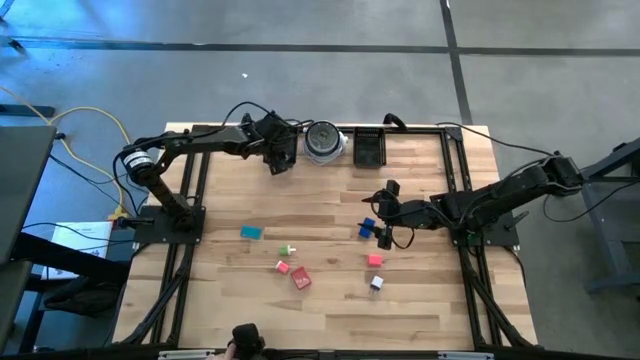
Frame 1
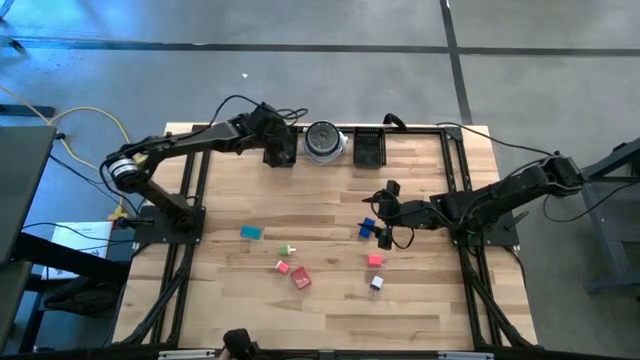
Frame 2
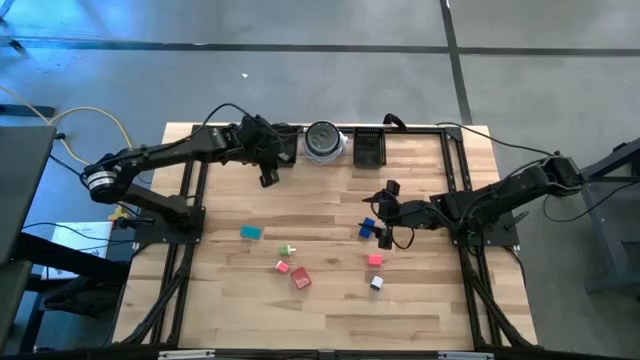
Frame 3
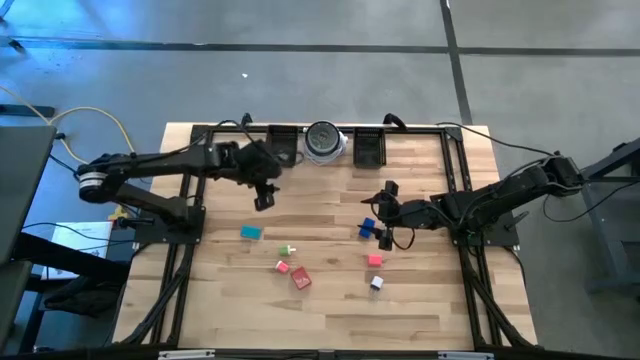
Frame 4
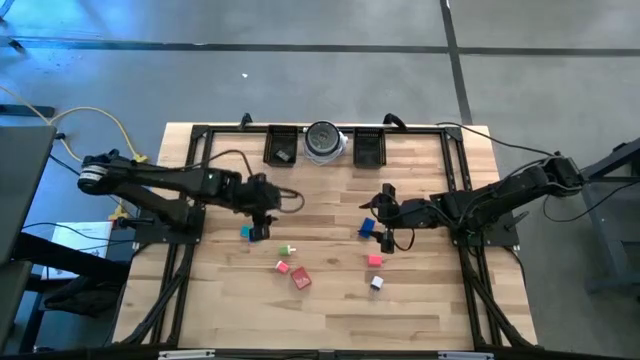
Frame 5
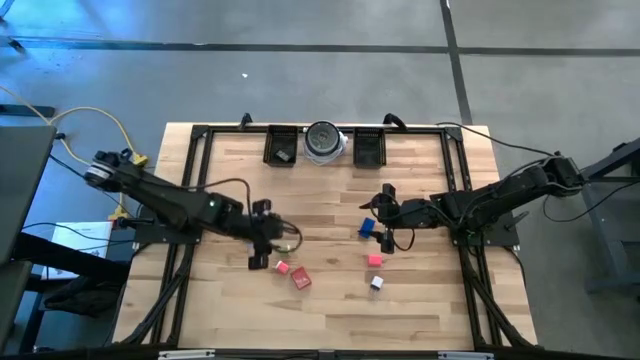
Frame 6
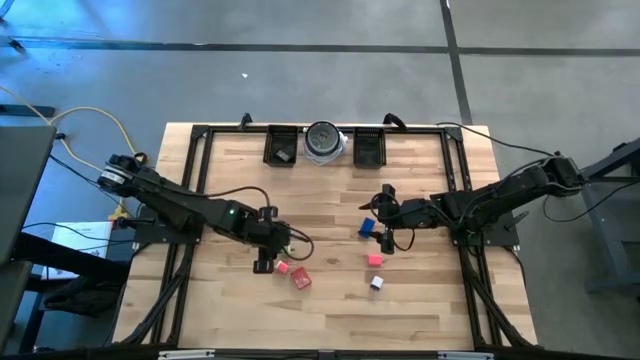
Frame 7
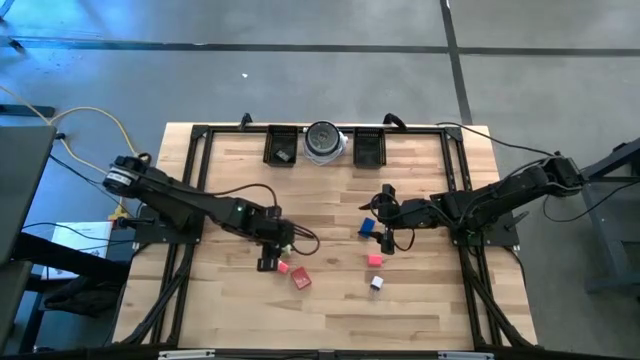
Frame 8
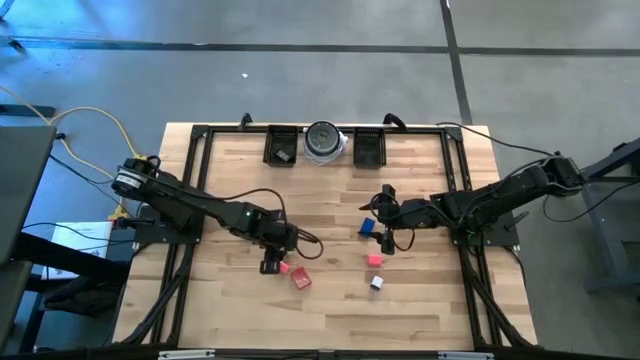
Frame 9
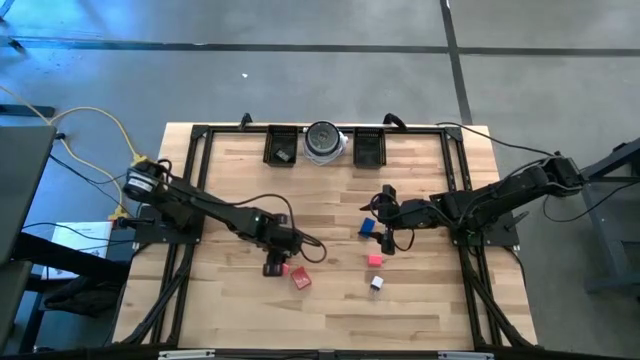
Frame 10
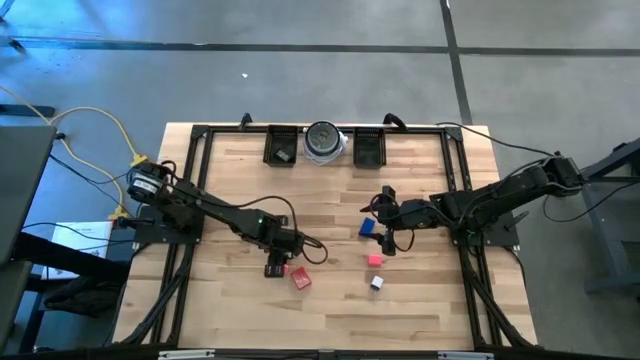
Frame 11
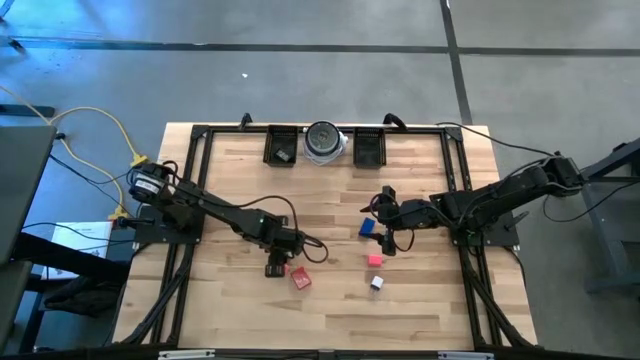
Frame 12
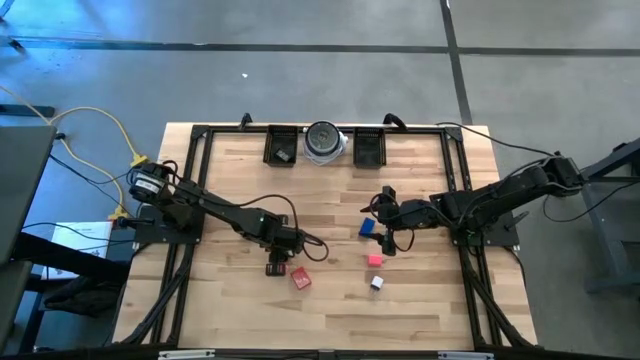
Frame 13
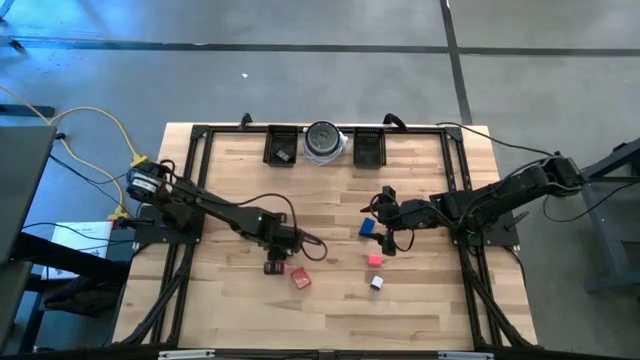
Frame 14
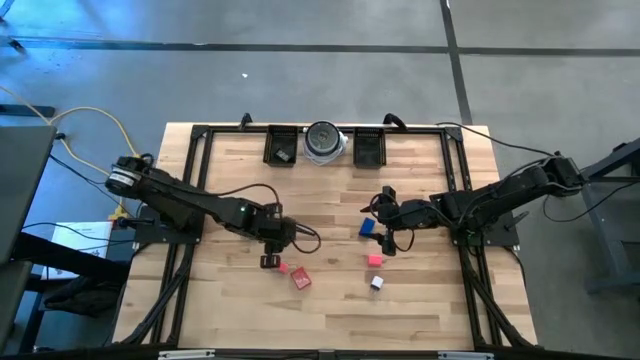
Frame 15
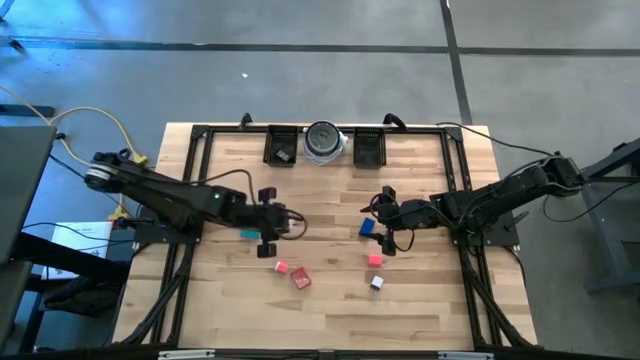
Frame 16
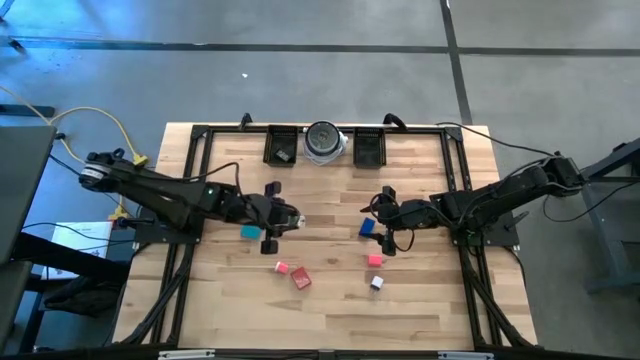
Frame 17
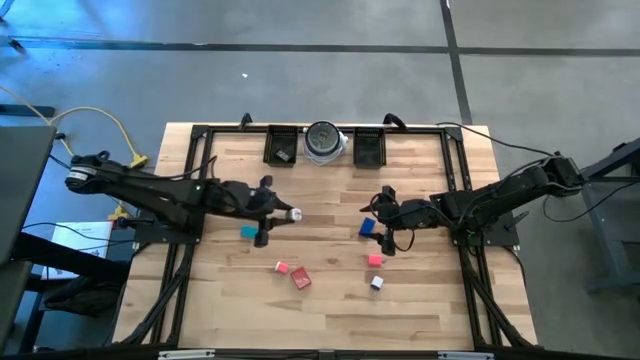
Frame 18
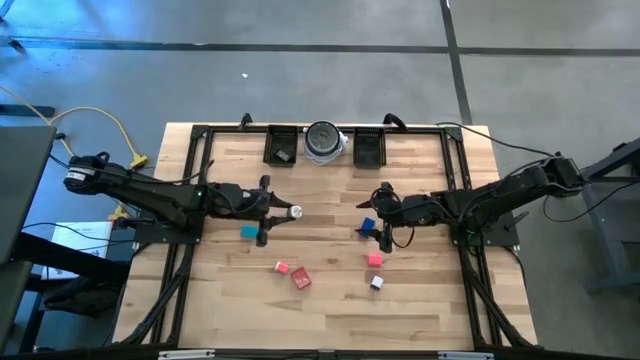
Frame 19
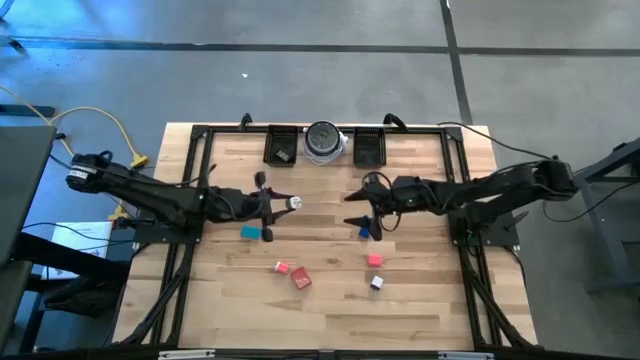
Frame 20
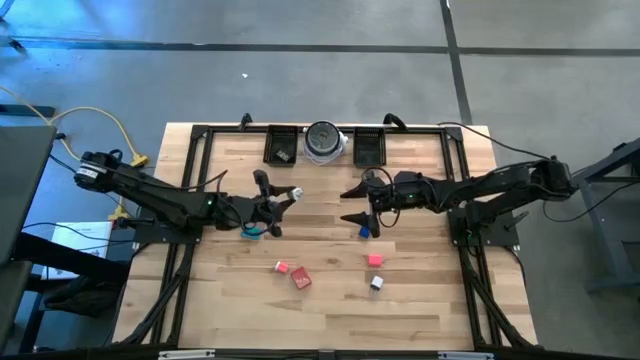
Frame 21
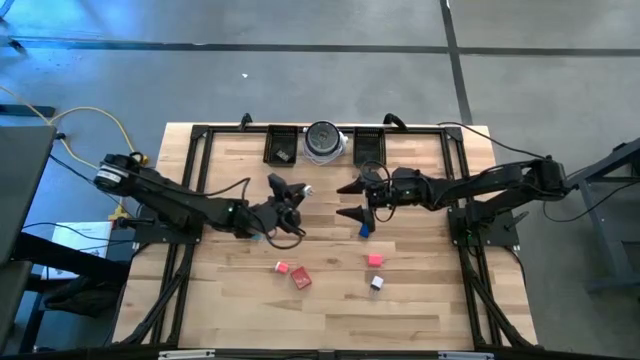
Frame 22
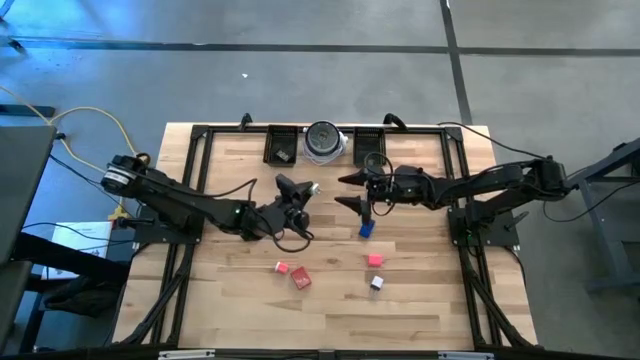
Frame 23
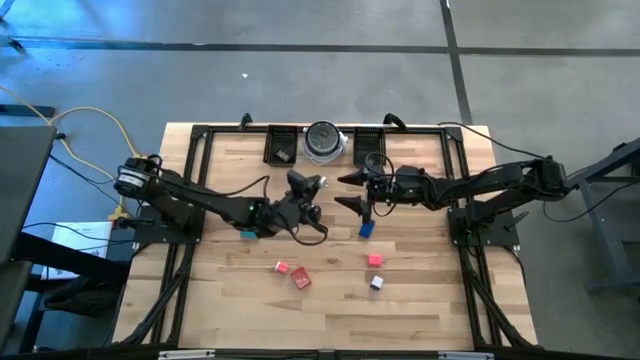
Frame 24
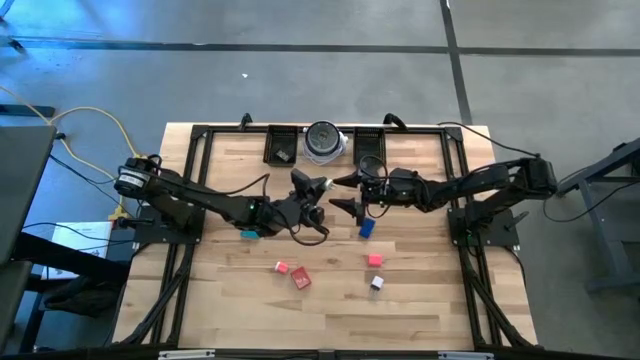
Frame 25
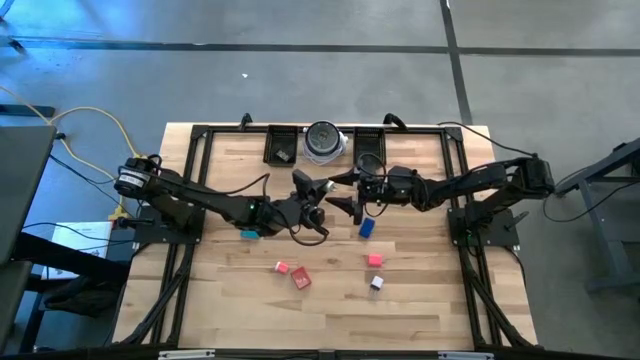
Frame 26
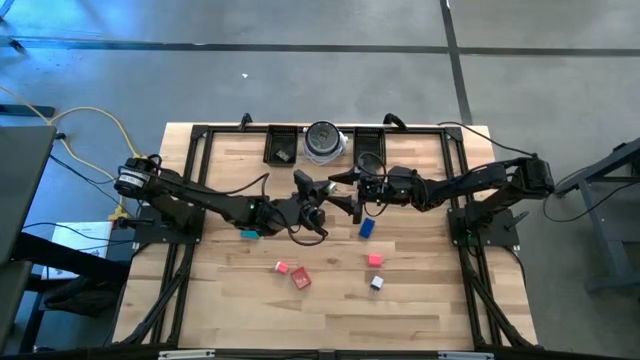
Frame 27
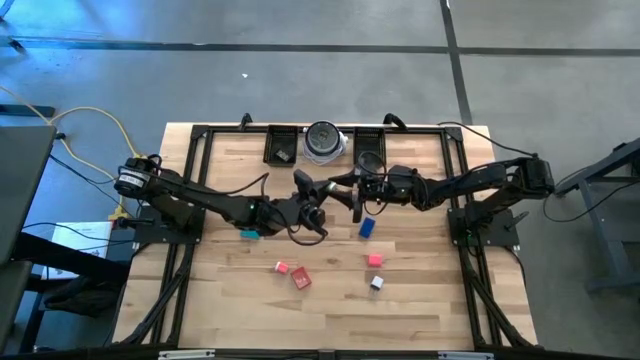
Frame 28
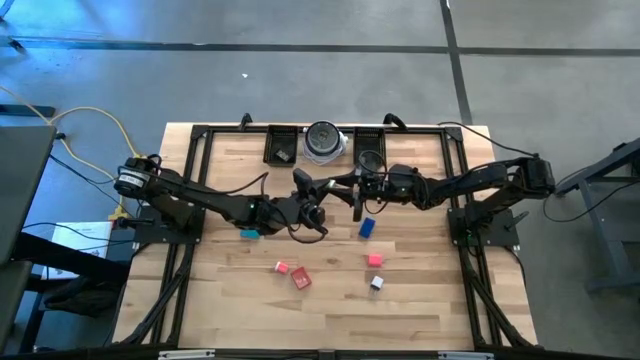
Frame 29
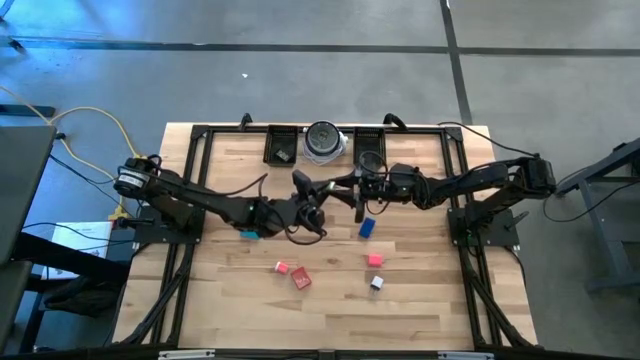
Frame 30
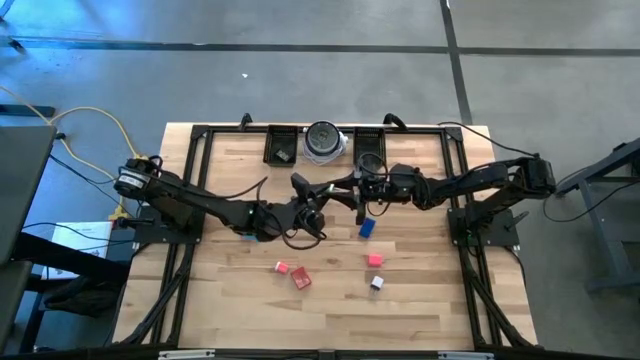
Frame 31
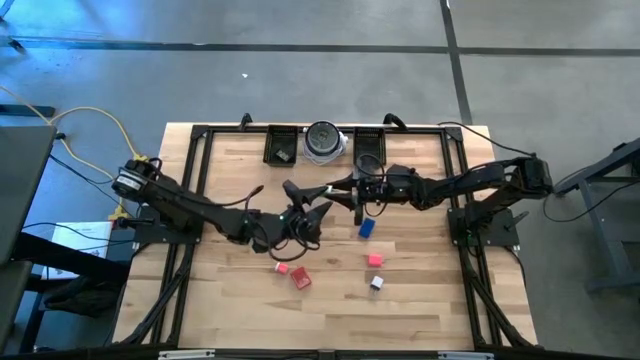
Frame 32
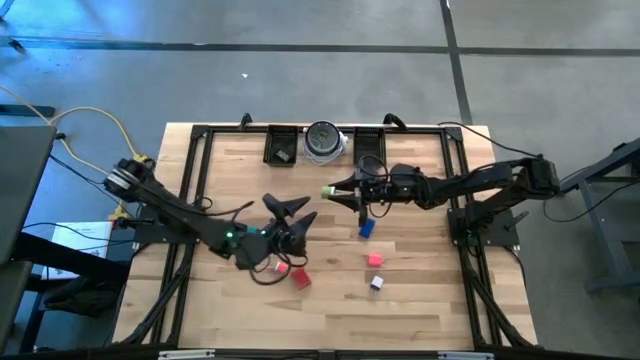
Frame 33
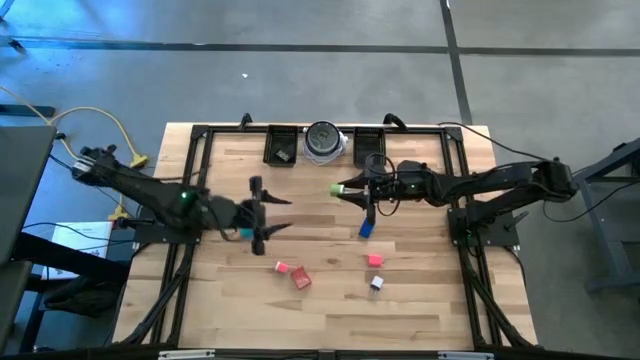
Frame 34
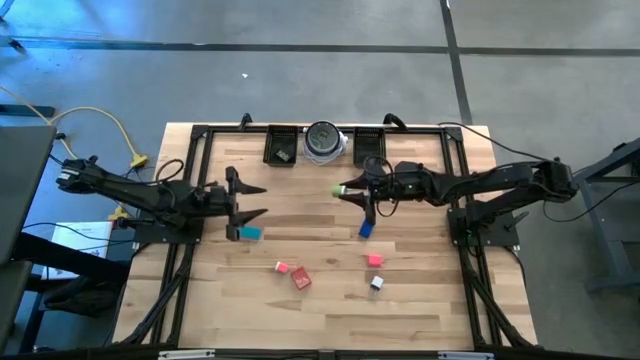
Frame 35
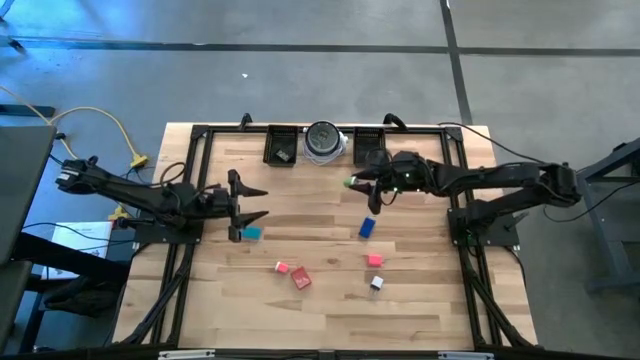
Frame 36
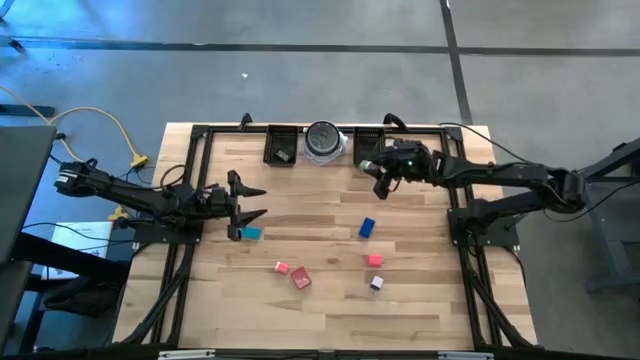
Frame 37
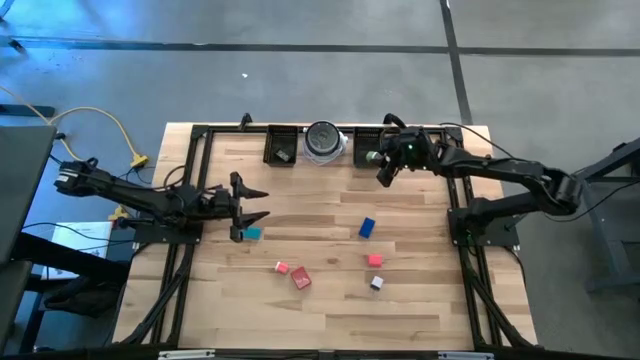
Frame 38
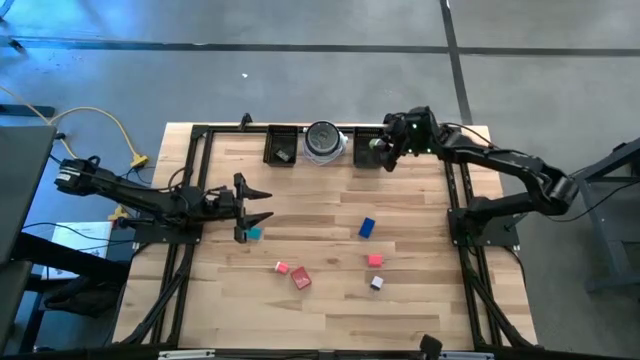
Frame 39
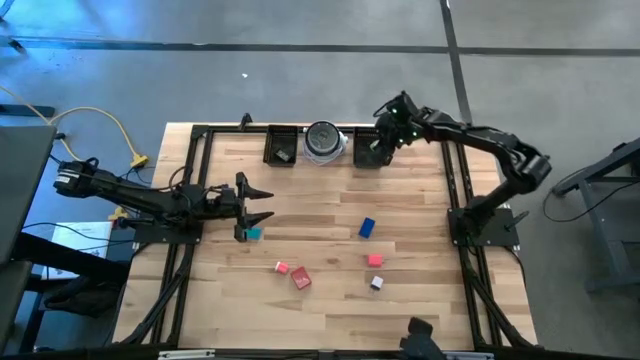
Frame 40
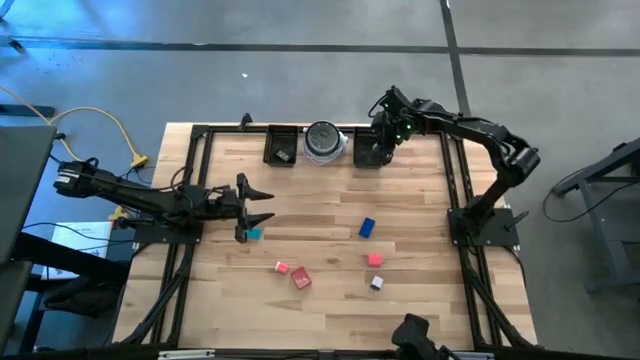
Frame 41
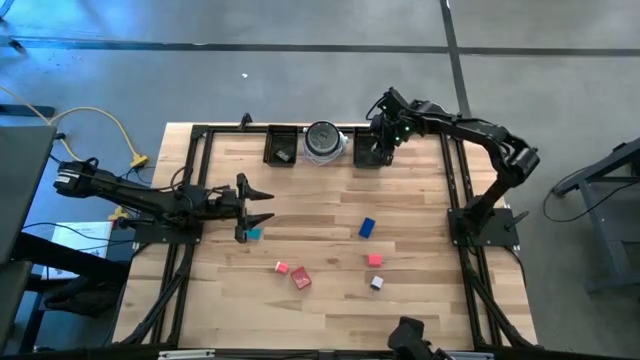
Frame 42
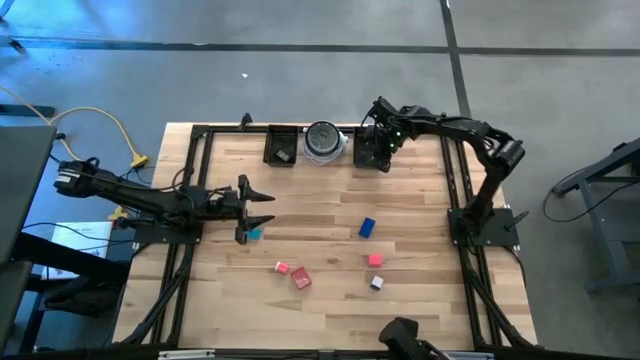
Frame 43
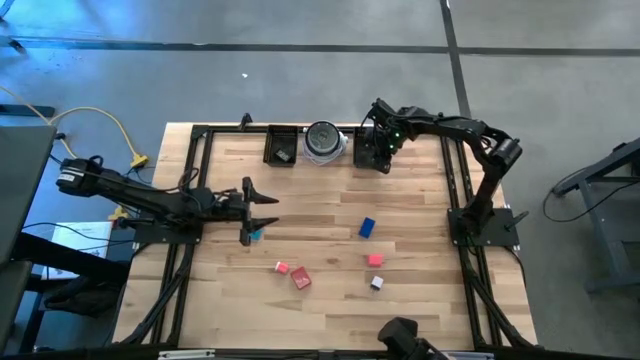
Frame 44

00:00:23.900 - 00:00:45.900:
Task: Pick & Place Office items
Put the green charger adapter into the right black basket
